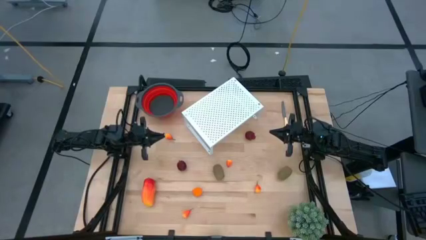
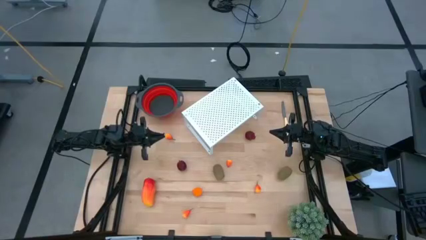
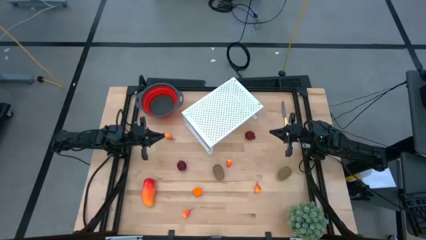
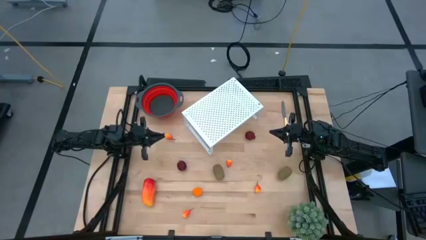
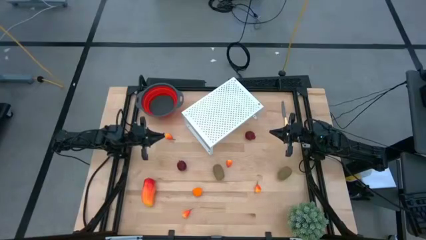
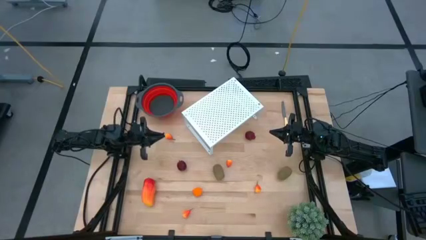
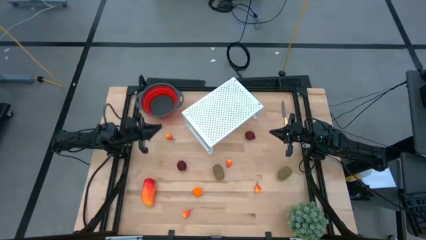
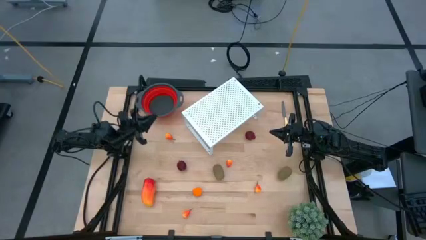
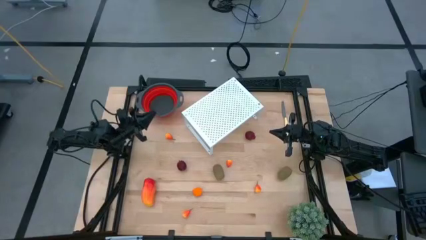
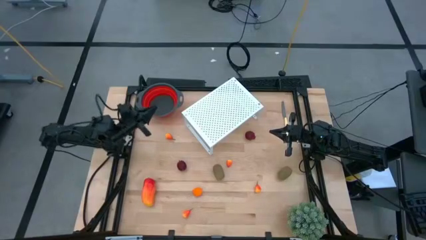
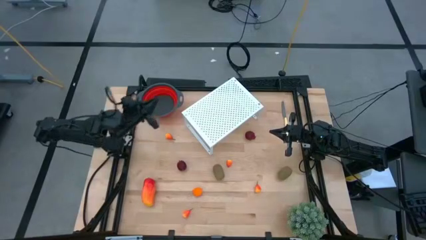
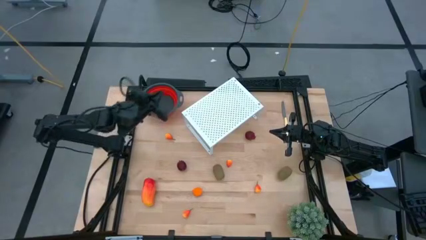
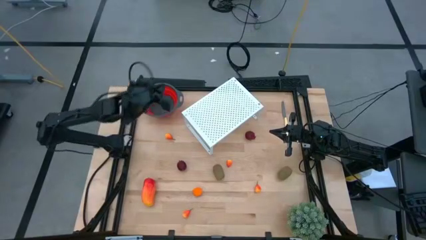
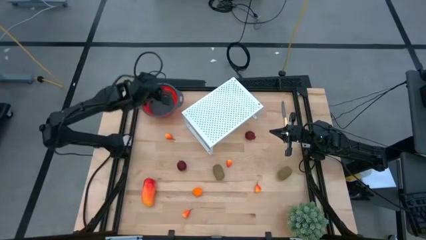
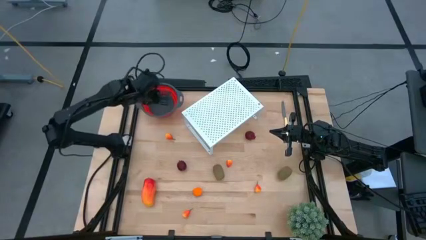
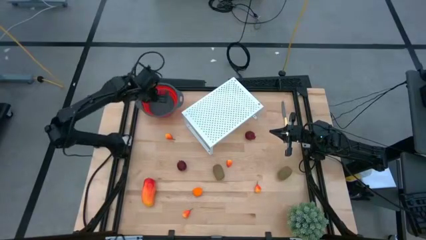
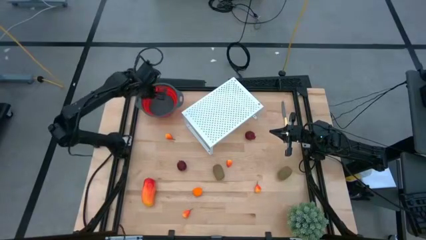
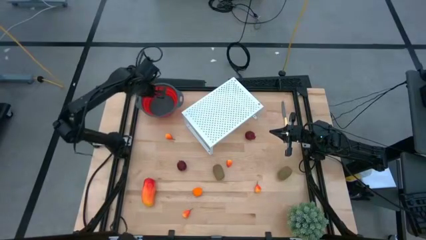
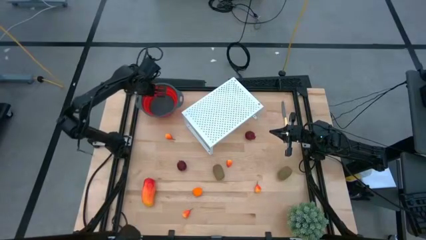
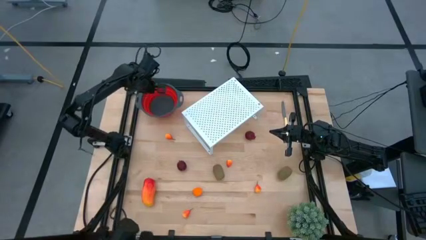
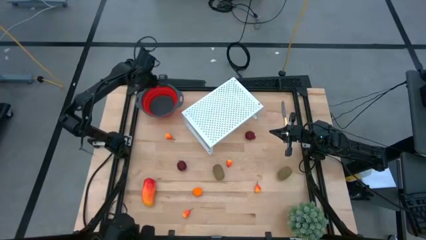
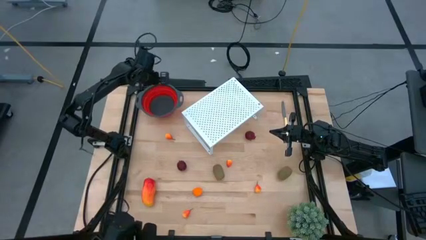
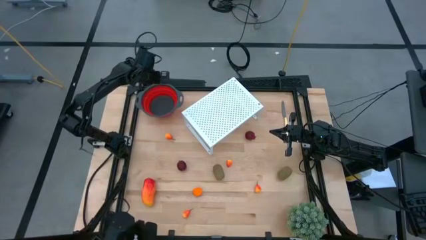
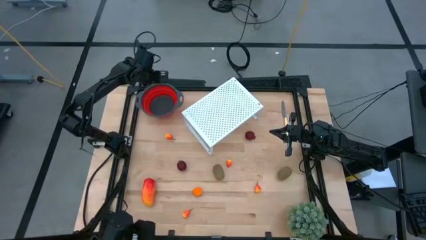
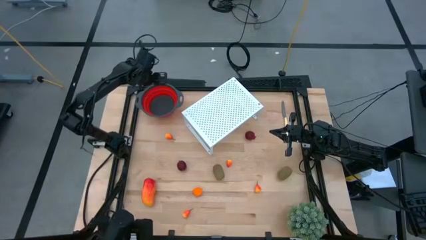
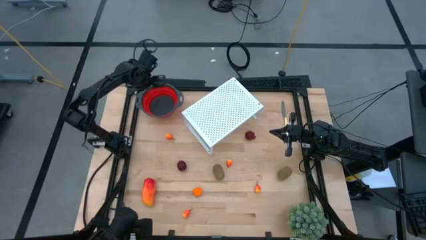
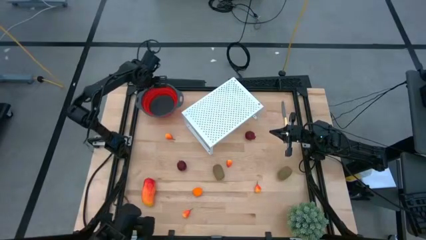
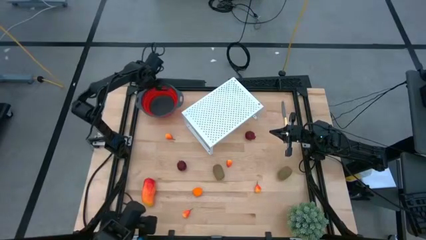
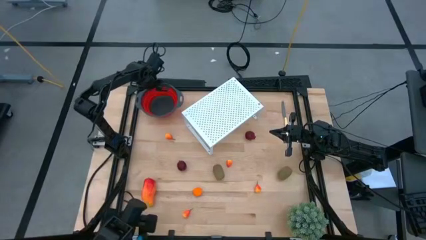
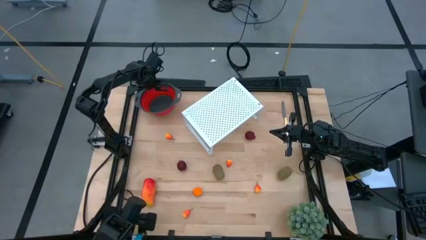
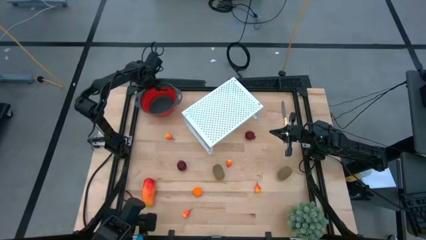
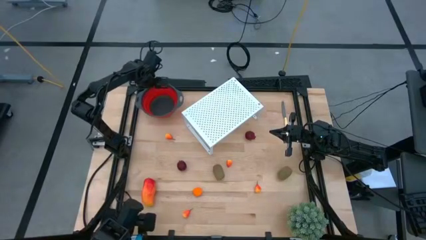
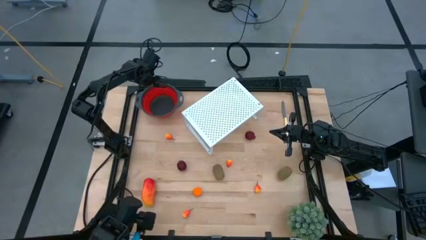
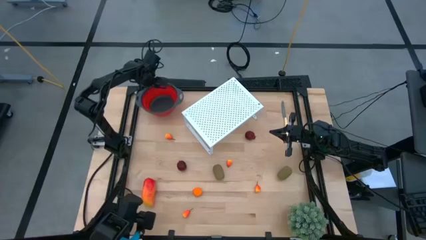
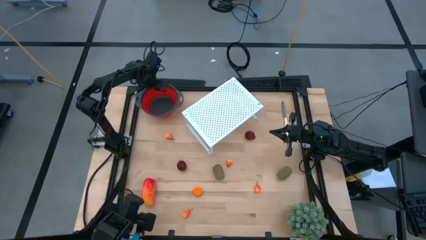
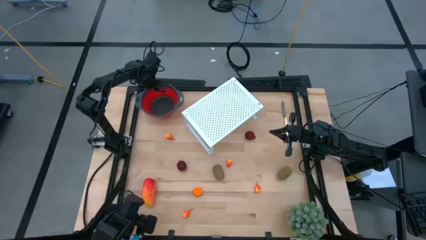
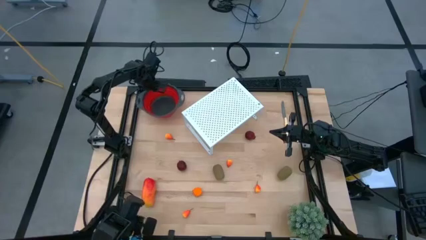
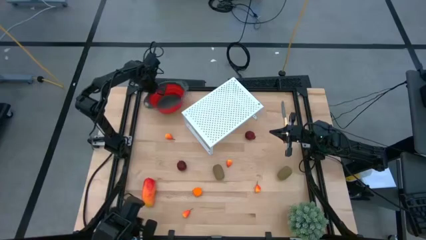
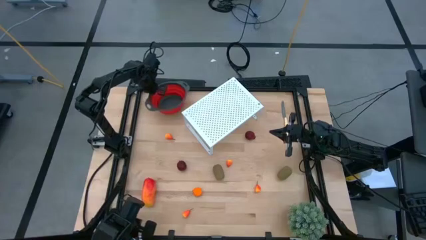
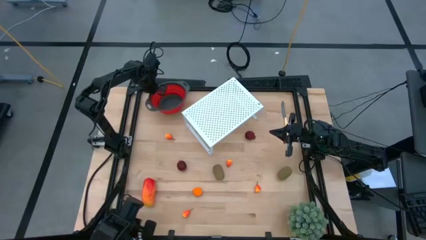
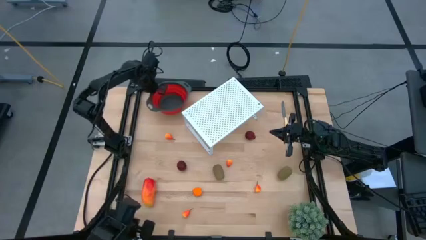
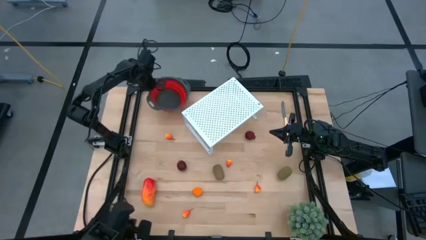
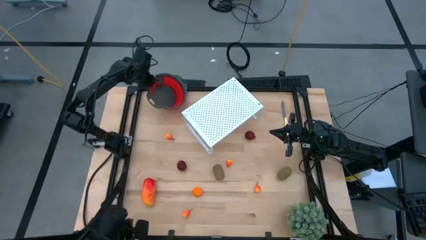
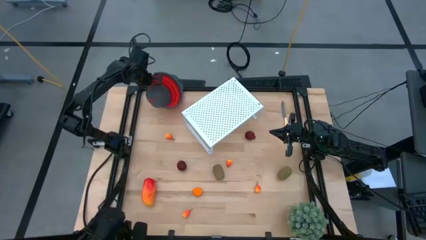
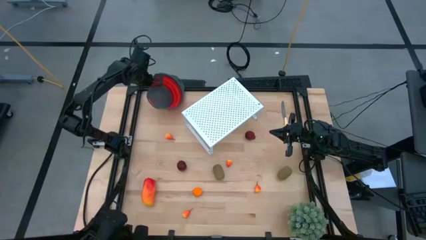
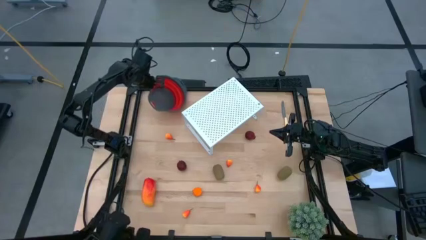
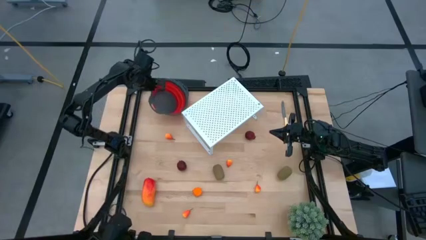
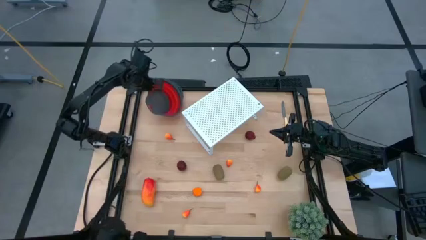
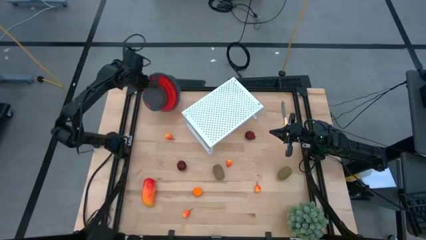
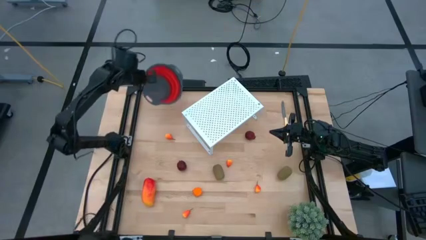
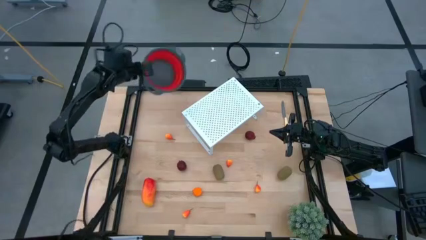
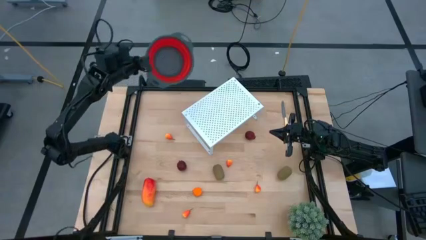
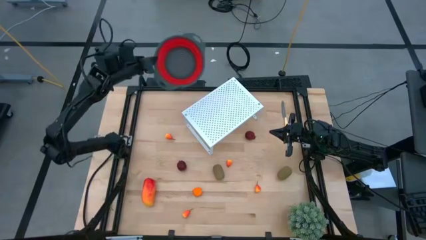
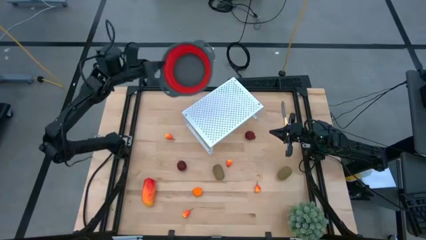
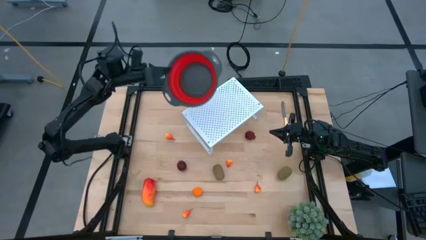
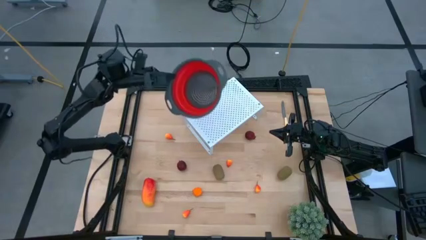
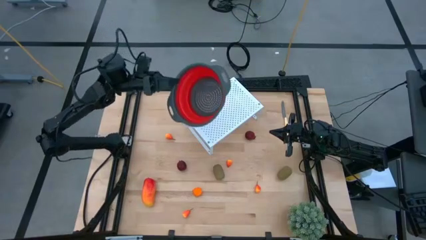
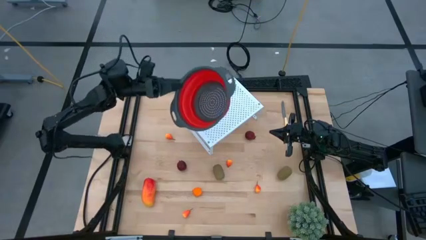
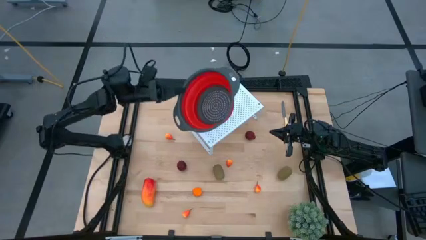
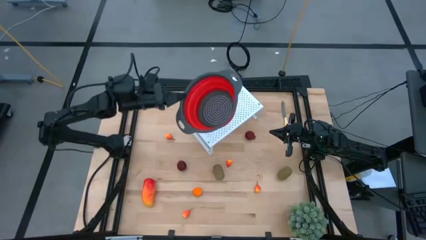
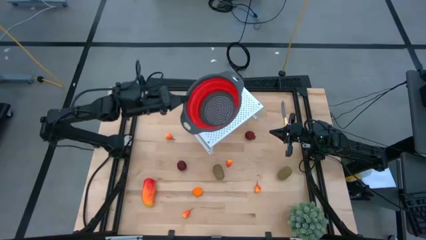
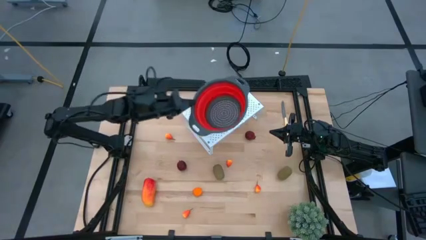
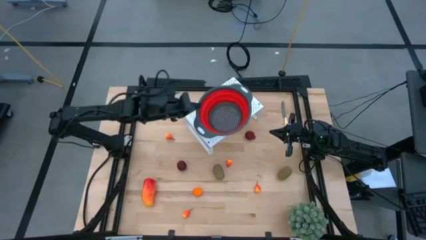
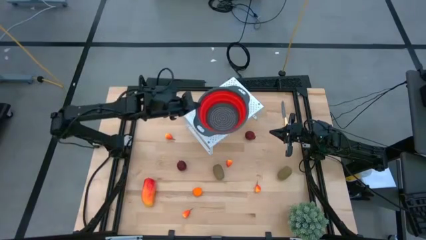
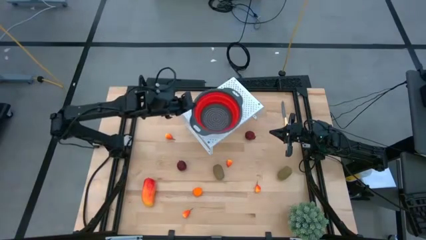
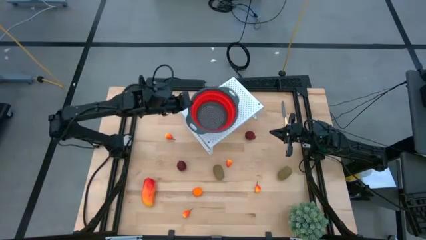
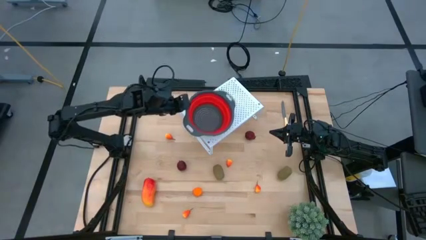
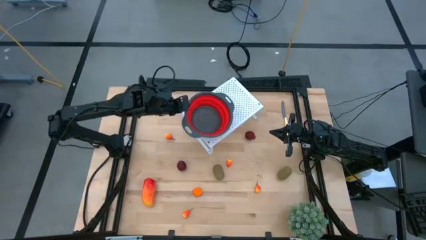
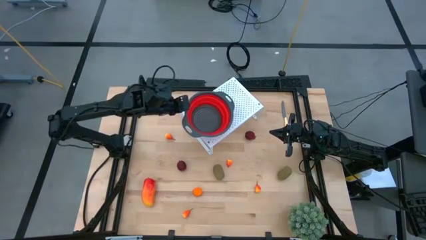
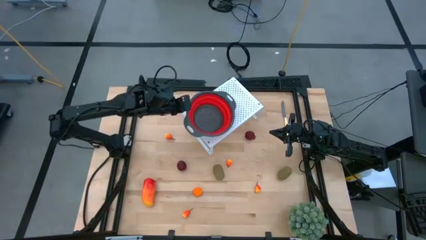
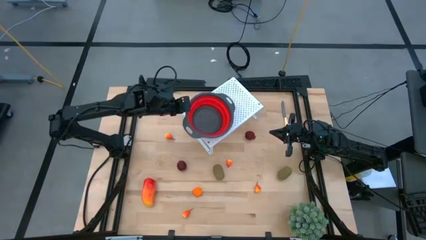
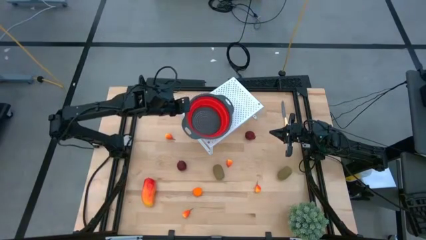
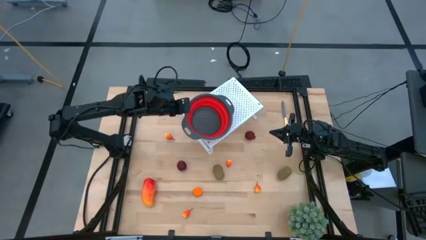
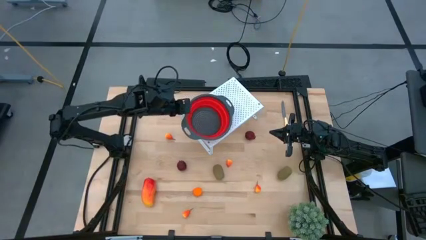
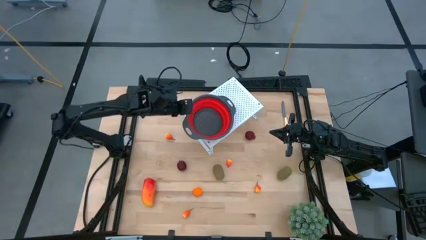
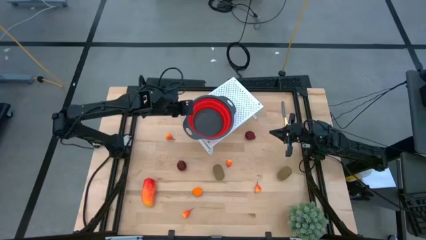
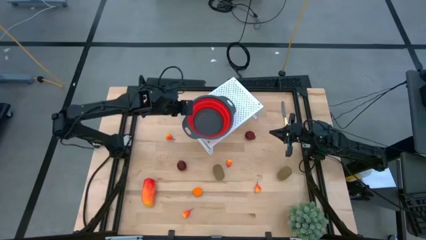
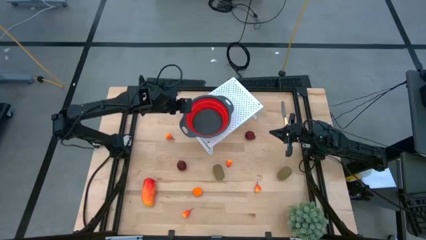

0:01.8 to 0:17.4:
Task: Pick & Place Fruit
Put the red strainer bowl on the shelf
